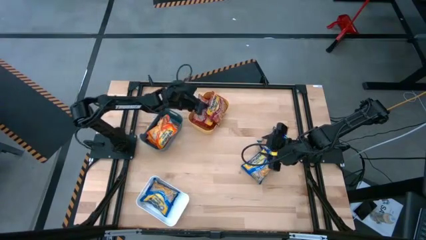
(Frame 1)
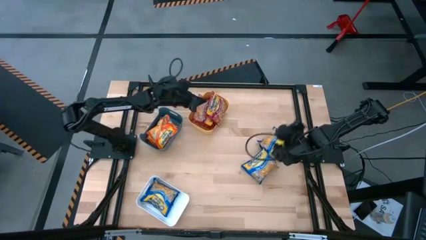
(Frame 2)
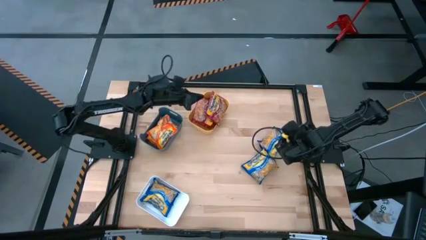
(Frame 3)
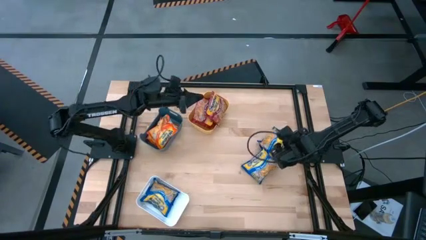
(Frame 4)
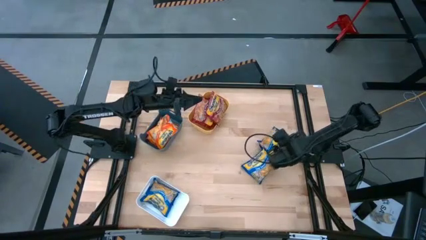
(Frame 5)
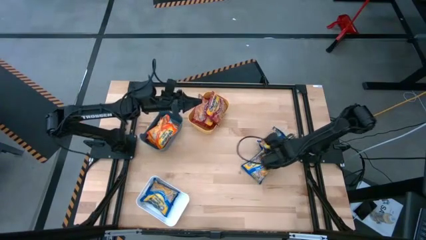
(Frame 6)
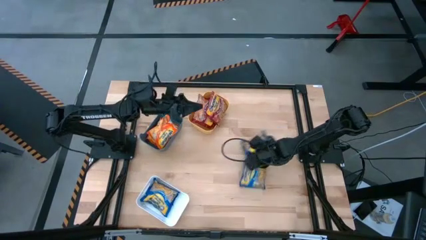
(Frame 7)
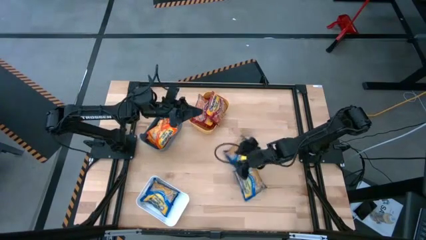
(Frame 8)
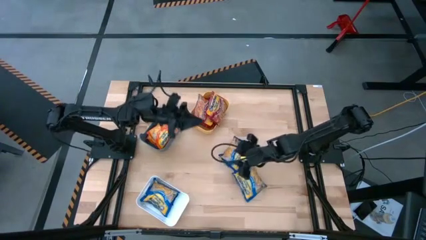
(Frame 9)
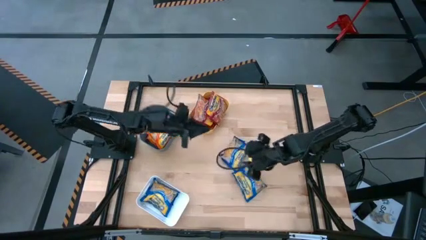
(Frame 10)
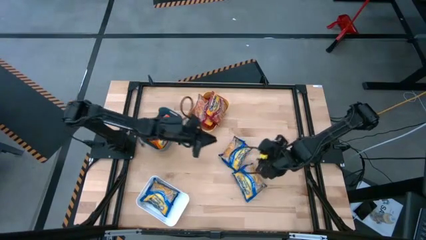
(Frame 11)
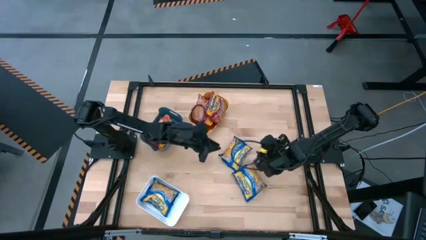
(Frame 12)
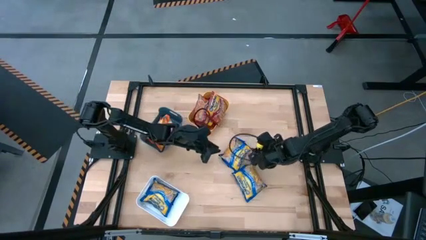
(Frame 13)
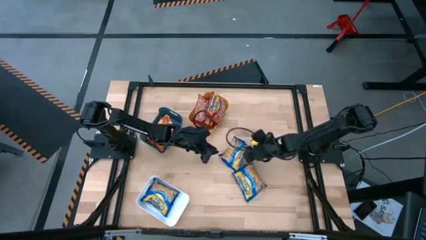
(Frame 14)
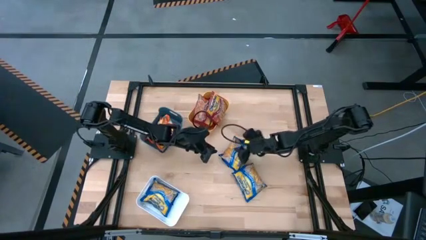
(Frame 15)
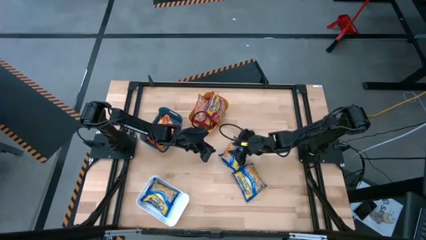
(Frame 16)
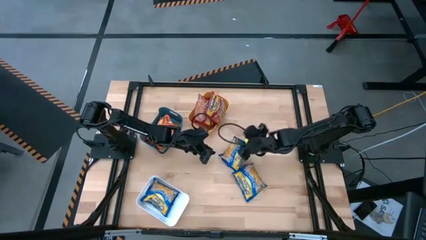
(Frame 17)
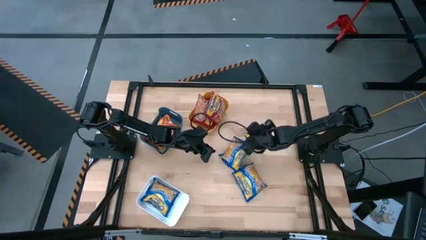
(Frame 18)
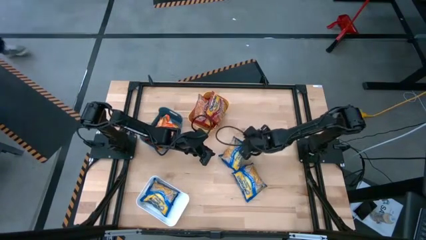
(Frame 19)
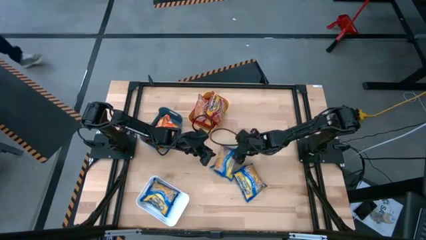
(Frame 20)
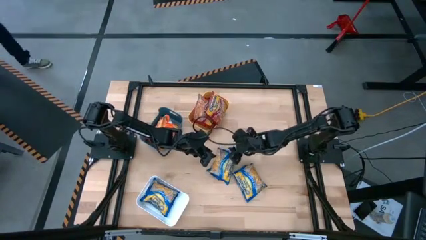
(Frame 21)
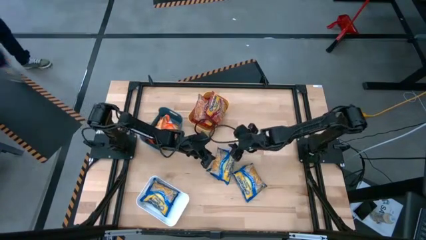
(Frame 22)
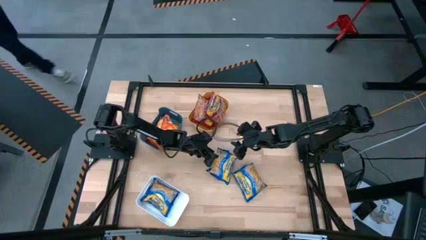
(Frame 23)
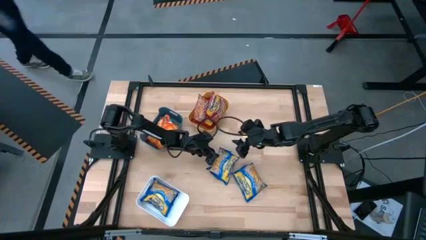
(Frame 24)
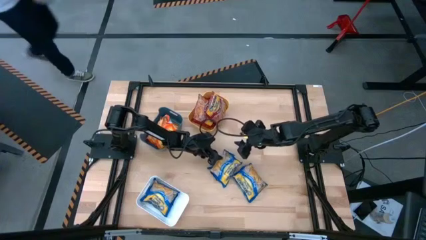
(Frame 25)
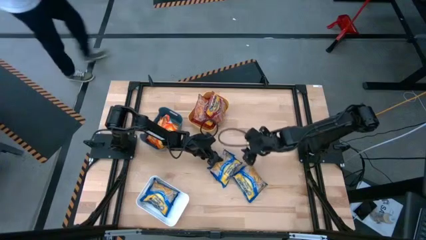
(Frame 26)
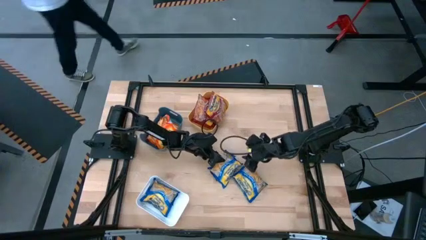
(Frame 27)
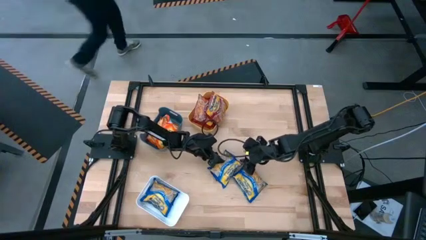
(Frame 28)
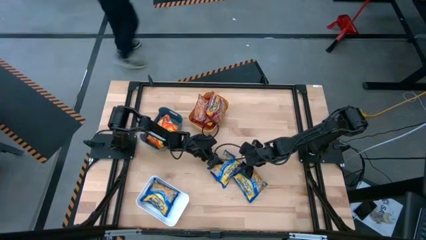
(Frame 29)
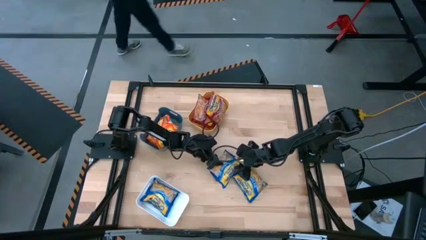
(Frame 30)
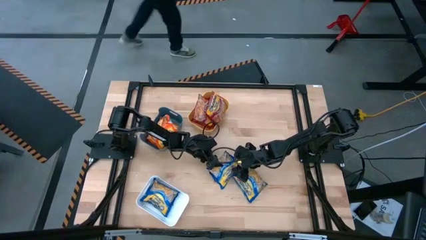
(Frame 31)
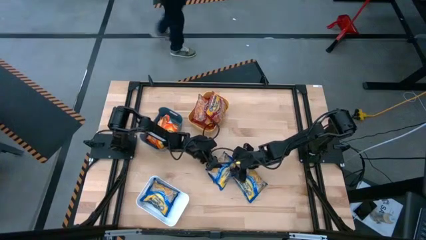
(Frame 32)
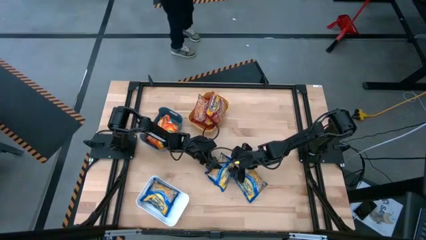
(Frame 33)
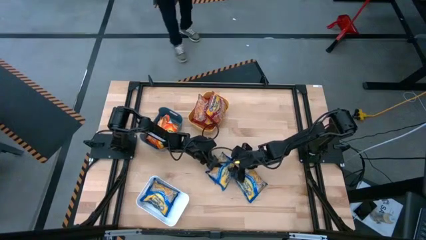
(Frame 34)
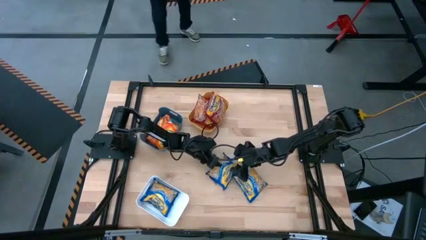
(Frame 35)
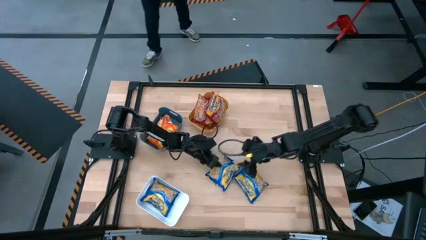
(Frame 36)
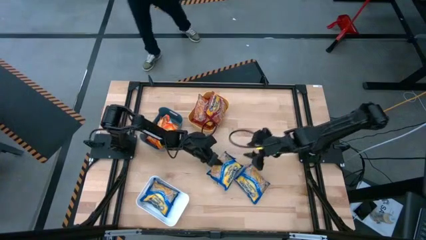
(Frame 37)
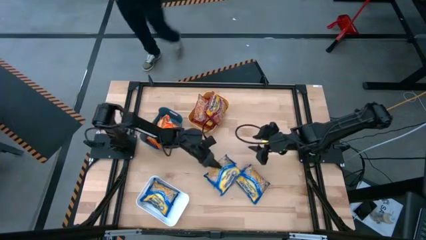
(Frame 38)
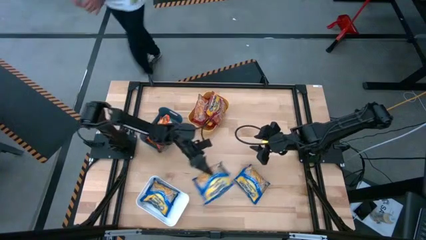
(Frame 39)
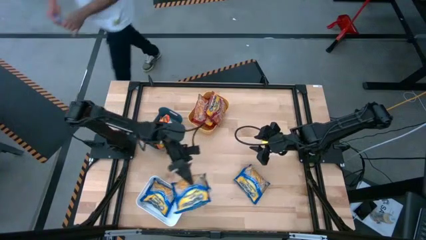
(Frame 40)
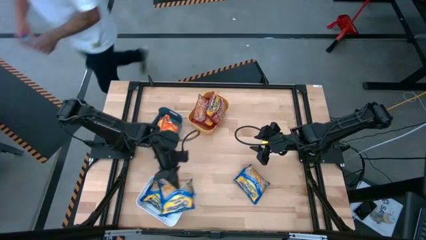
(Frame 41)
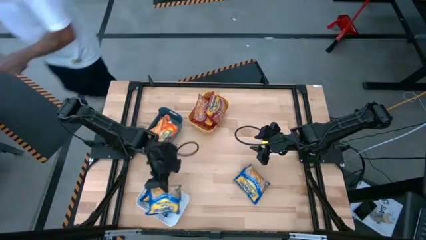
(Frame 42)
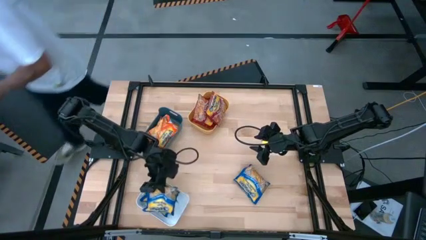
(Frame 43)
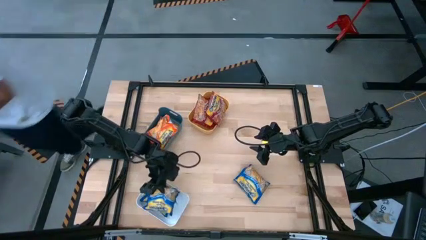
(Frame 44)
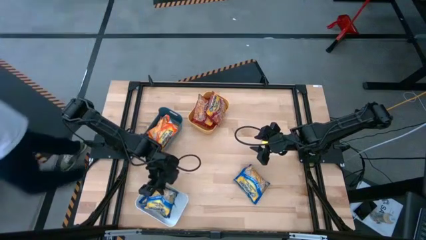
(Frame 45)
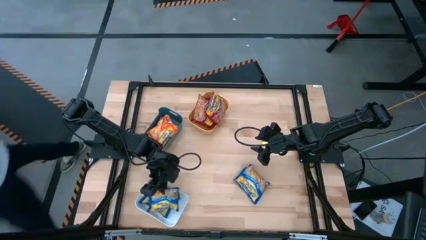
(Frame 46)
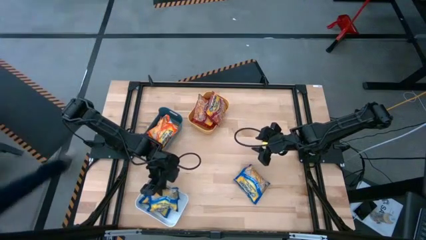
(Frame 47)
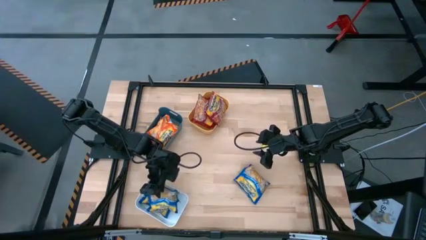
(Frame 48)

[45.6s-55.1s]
Task: Sort Maruchan noodles
Put the top blue noodle pack into the white bin

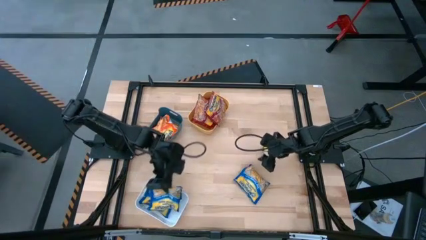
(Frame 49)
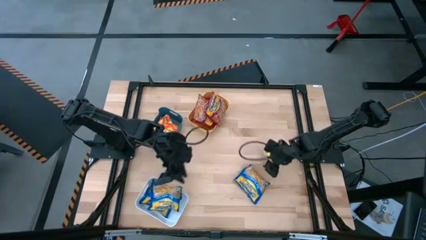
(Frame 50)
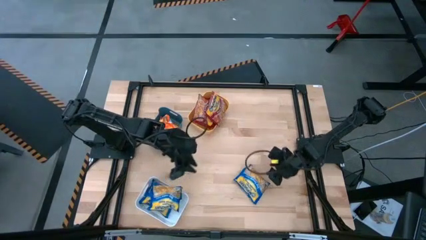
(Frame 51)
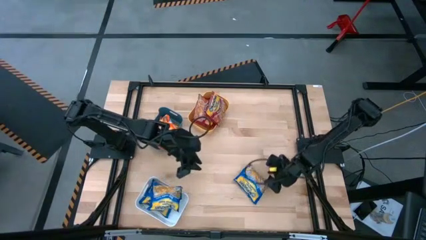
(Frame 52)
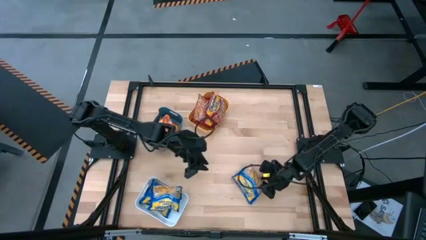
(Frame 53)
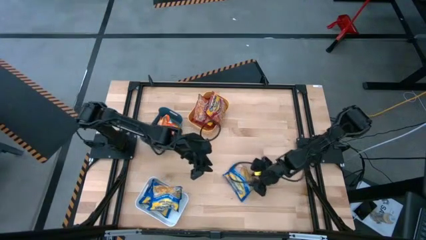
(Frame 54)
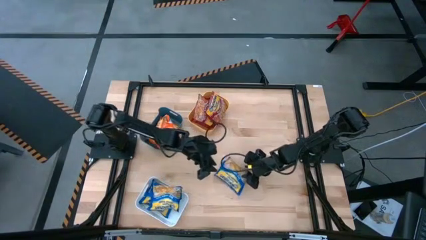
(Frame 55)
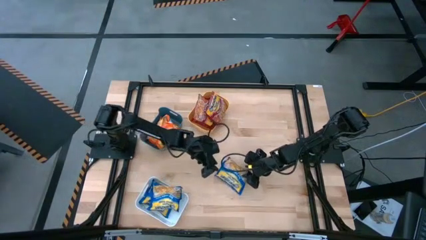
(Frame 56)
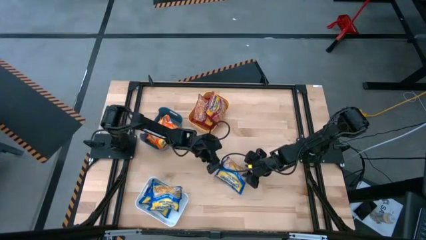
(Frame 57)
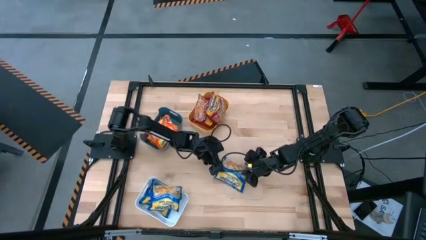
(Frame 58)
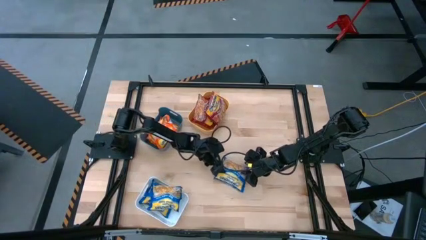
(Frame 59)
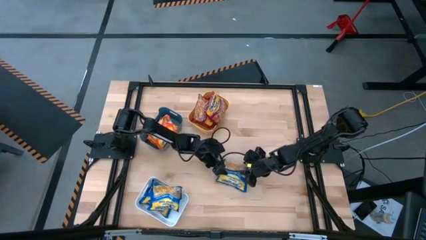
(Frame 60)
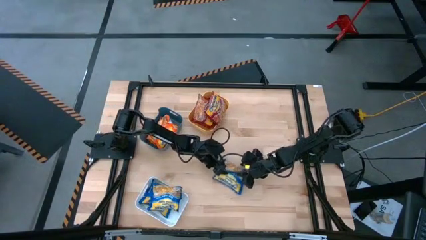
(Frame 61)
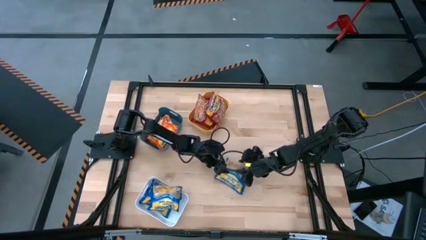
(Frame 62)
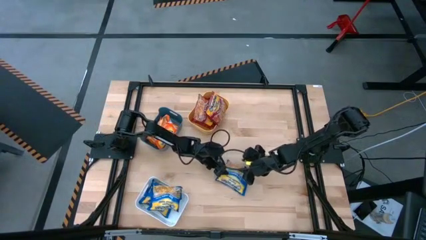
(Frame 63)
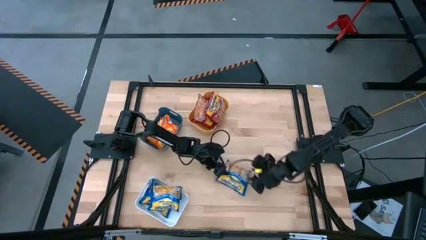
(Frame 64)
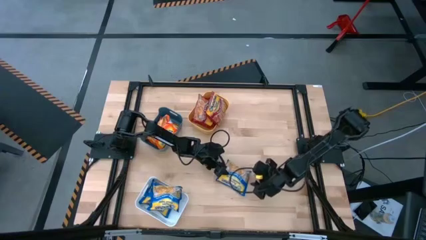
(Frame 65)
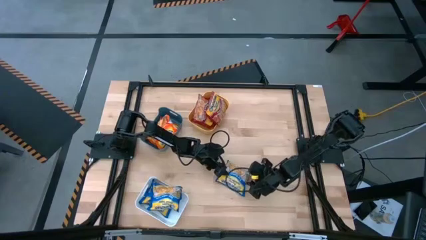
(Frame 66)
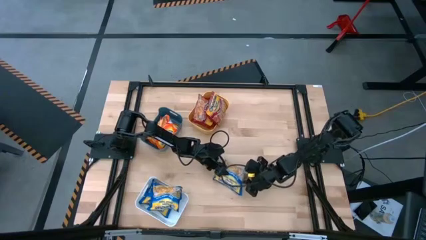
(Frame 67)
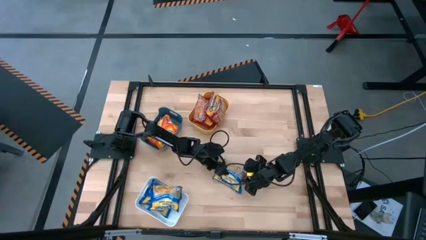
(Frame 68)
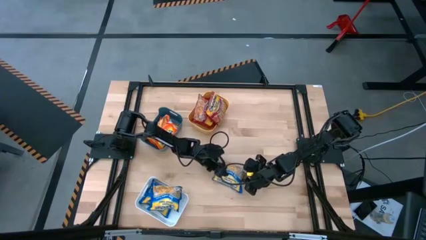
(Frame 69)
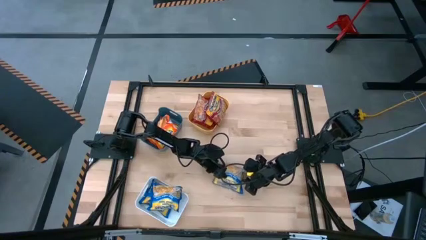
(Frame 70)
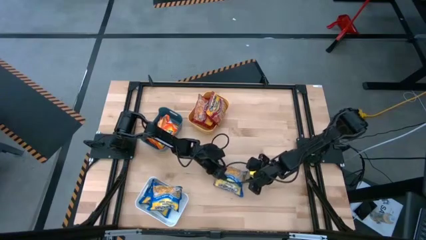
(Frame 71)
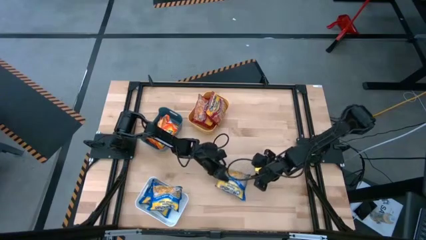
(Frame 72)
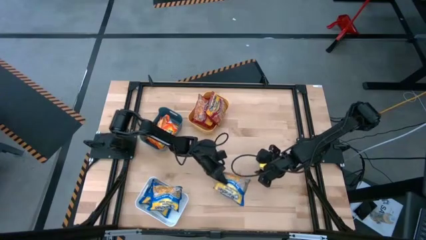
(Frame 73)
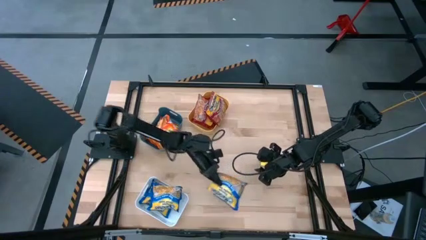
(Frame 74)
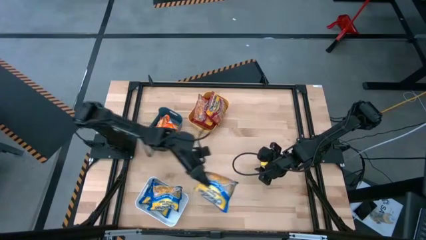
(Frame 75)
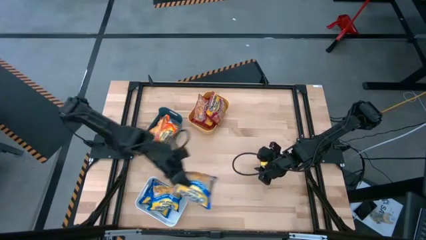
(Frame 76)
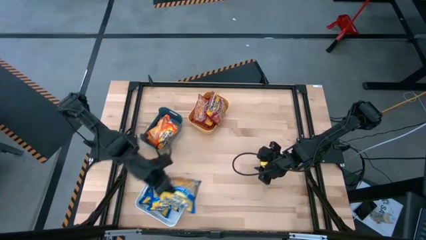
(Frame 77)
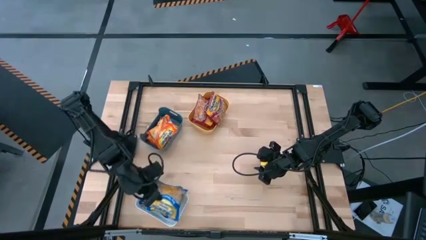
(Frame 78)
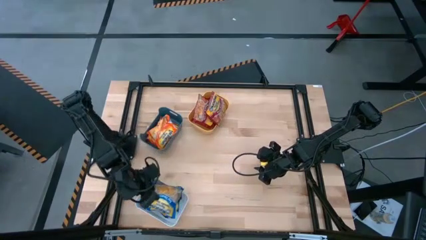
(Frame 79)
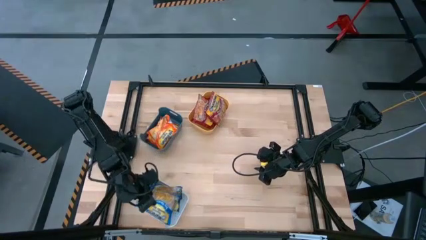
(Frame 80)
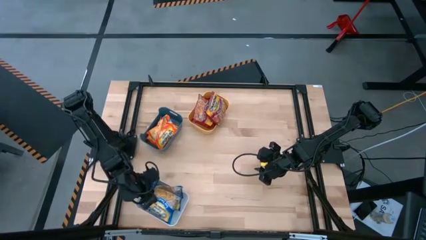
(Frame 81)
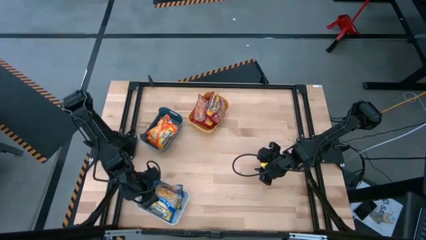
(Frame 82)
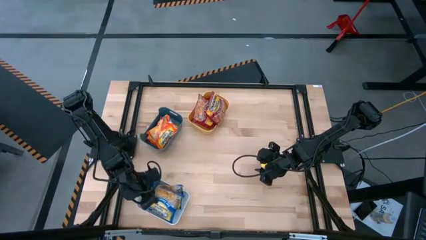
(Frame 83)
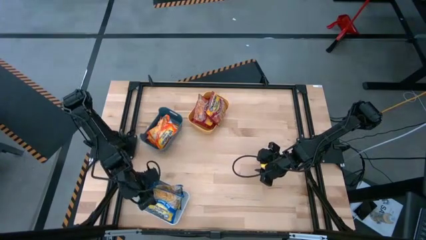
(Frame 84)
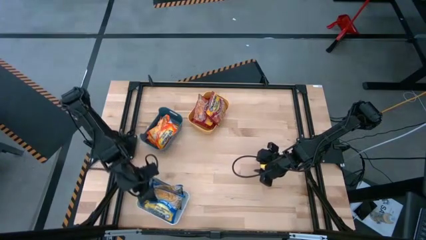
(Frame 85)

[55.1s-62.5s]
Put the blue noodle pack into the white bin
